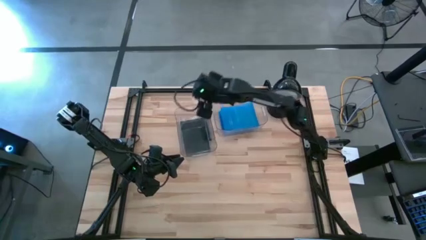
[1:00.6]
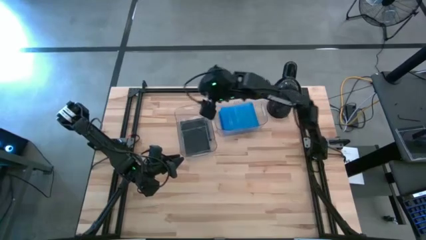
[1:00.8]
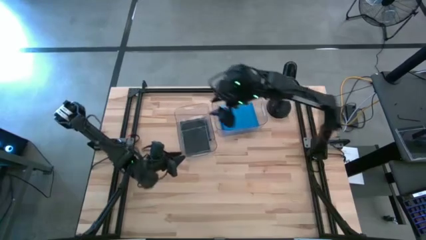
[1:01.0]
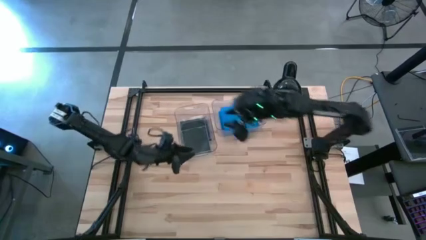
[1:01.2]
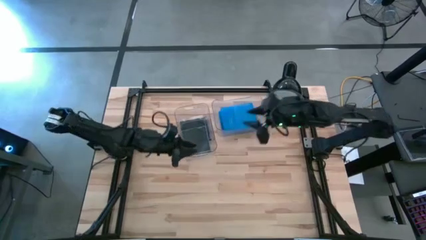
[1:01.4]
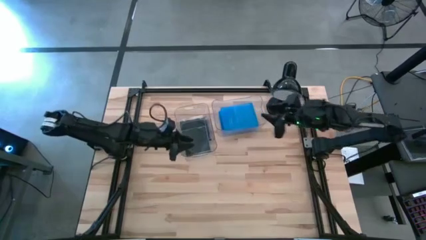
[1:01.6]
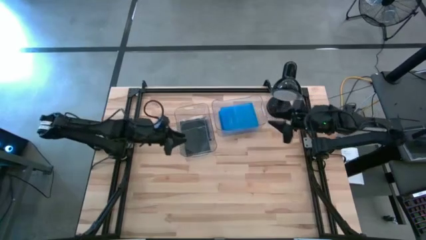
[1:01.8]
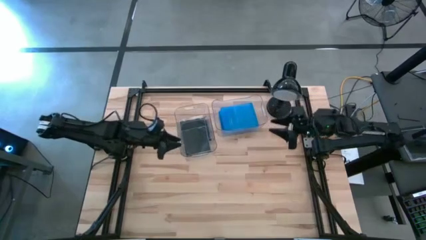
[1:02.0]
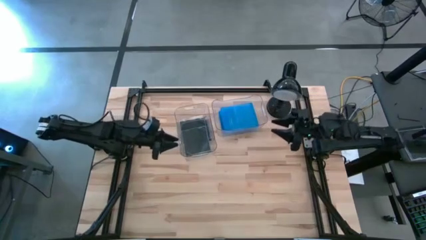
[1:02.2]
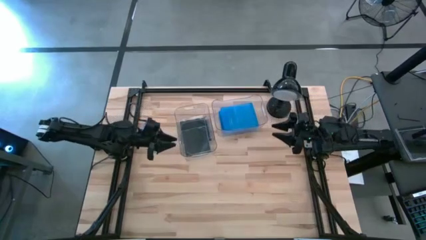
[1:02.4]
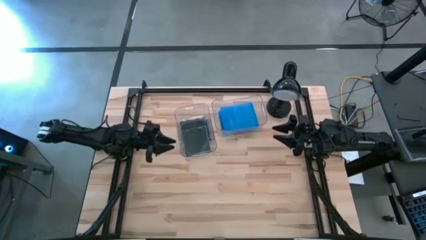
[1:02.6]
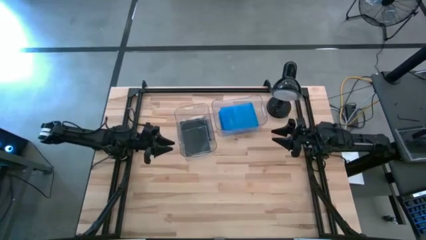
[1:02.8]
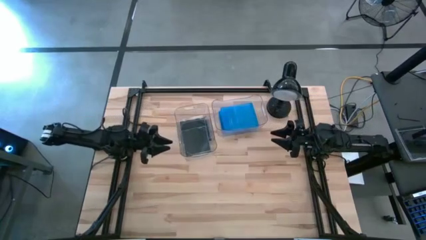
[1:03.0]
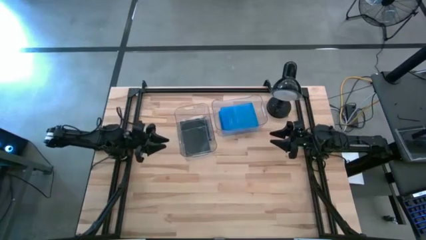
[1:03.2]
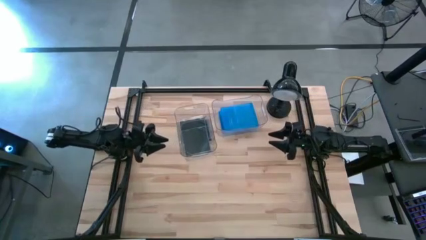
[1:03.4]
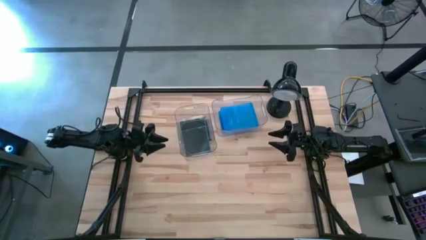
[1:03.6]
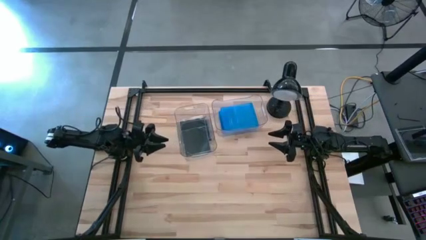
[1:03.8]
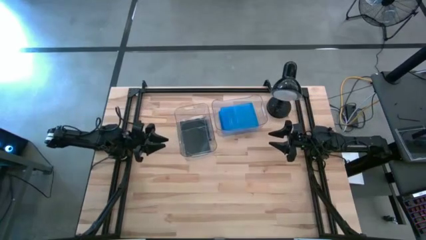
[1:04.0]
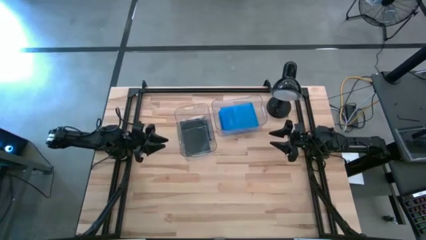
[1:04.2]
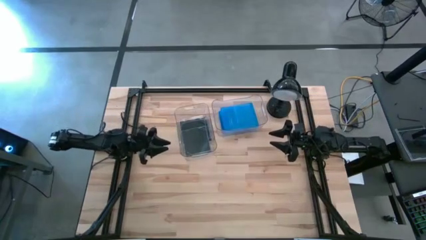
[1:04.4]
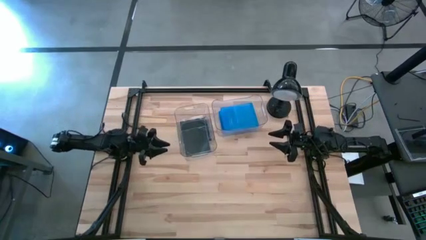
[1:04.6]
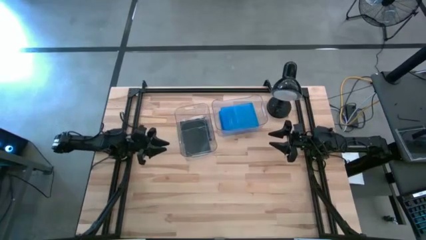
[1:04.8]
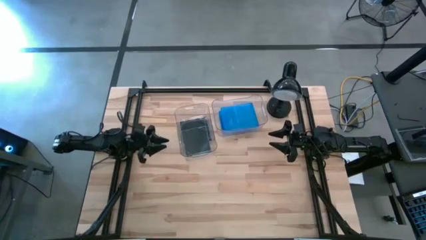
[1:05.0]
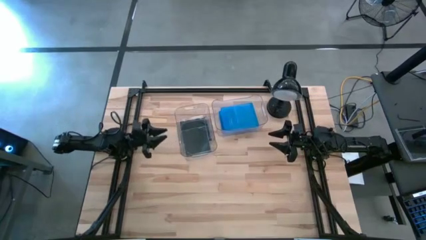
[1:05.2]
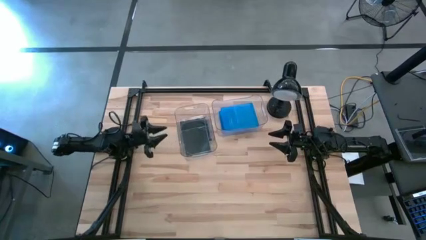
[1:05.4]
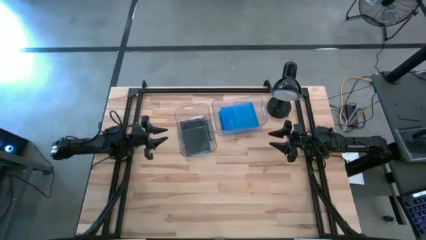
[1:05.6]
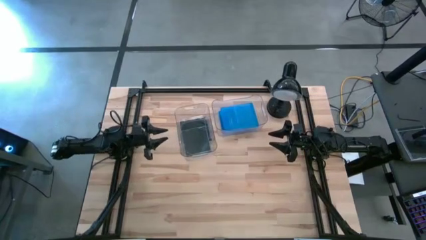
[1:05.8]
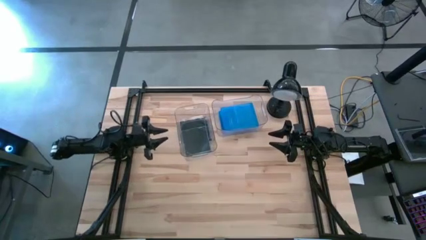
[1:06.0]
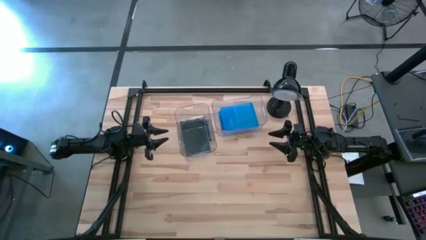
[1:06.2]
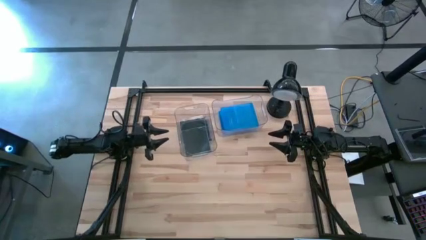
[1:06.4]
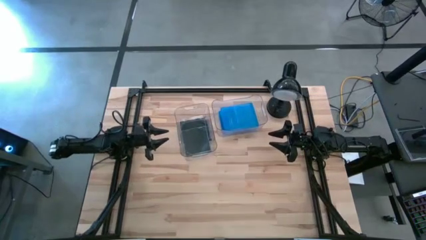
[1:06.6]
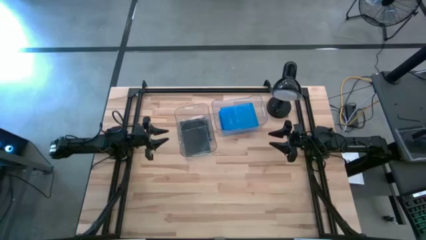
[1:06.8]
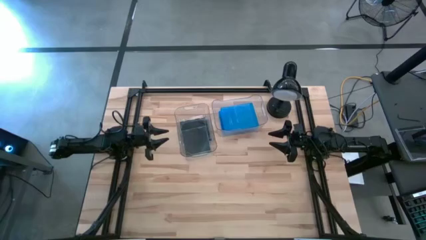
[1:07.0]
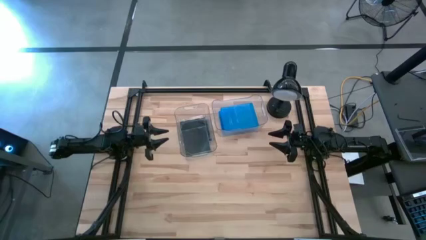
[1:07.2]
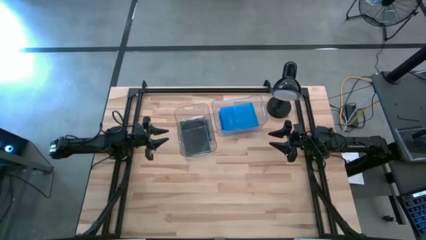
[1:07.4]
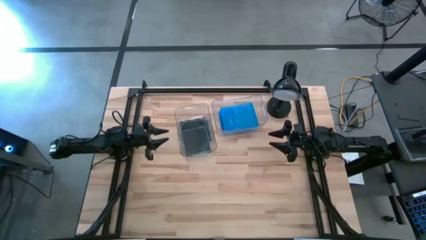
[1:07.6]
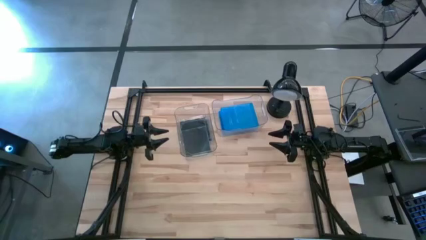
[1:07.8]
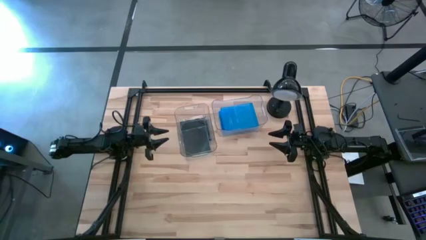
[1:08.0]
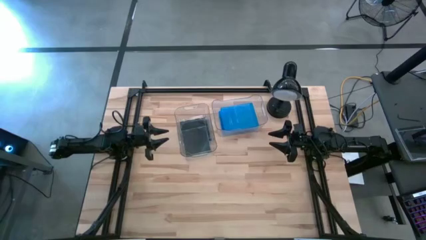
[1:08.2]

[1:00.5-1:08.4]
Task: Pick & place jewel cases by type
Return to Home Position

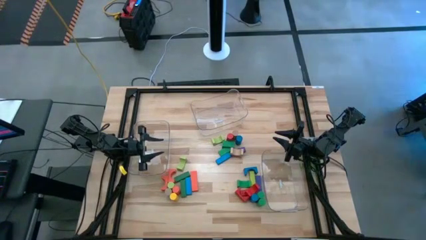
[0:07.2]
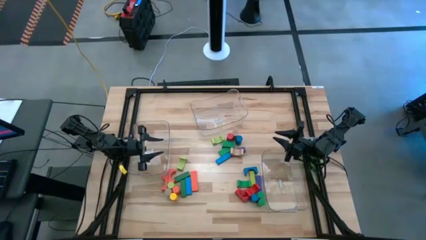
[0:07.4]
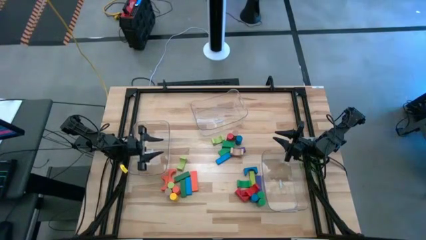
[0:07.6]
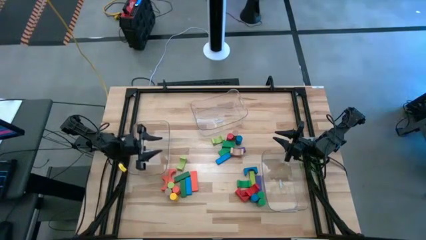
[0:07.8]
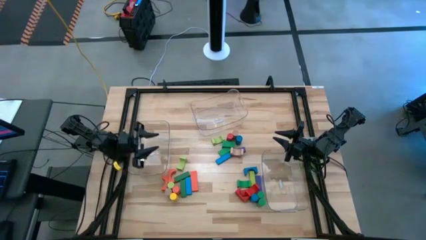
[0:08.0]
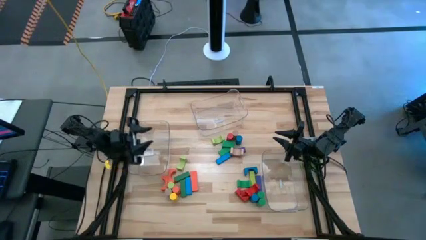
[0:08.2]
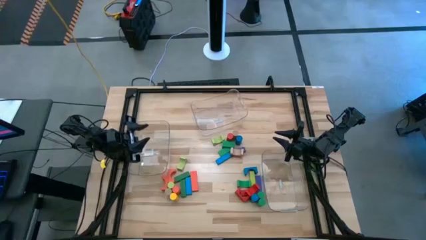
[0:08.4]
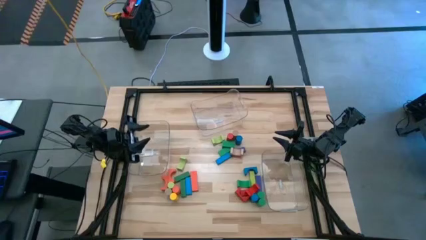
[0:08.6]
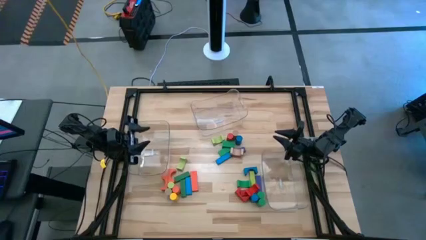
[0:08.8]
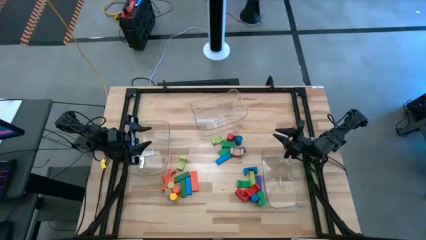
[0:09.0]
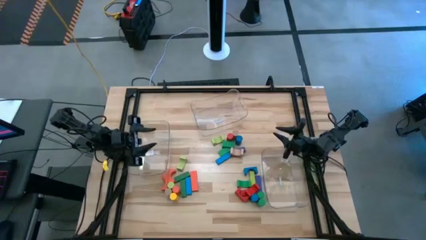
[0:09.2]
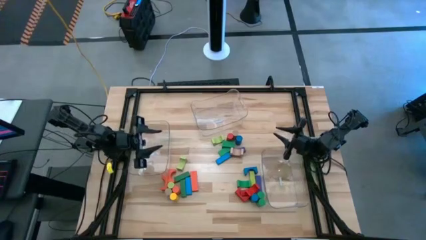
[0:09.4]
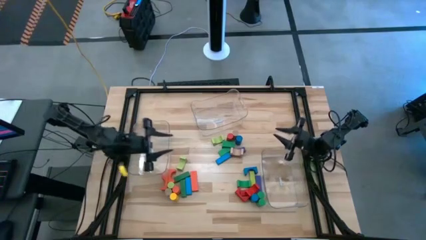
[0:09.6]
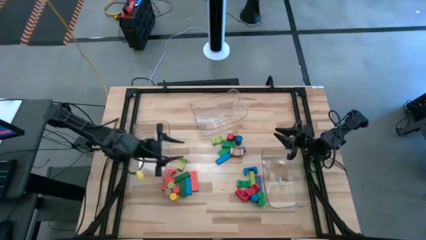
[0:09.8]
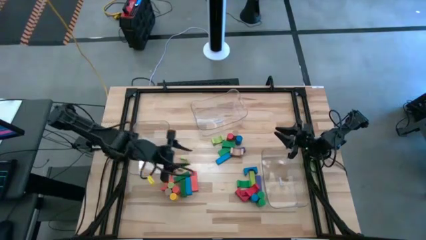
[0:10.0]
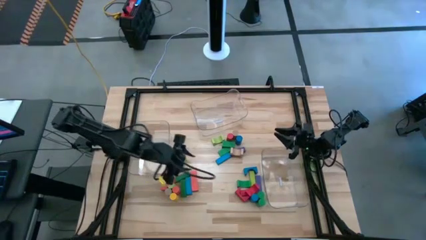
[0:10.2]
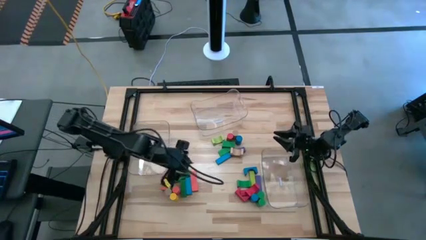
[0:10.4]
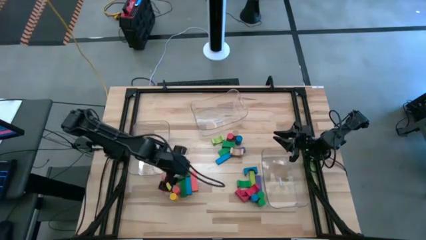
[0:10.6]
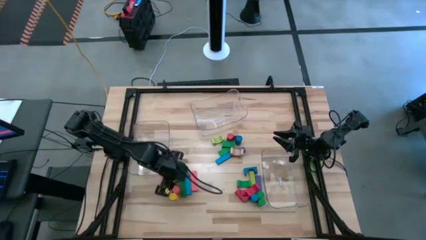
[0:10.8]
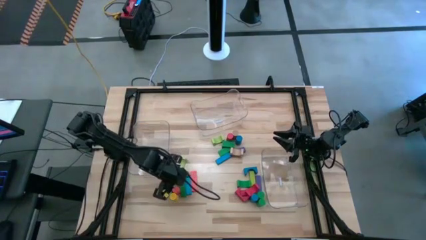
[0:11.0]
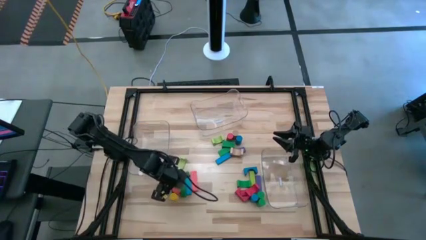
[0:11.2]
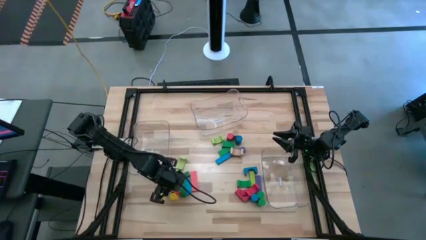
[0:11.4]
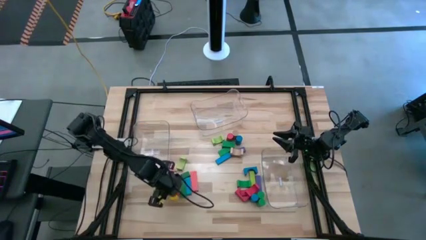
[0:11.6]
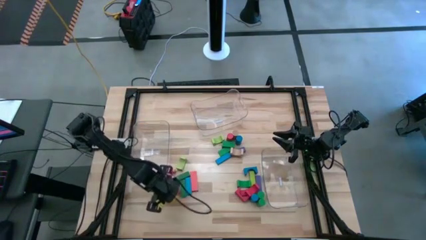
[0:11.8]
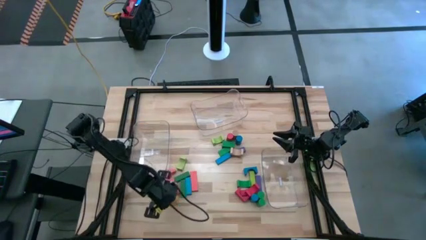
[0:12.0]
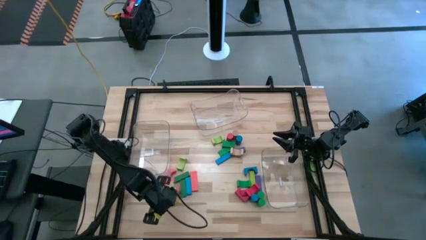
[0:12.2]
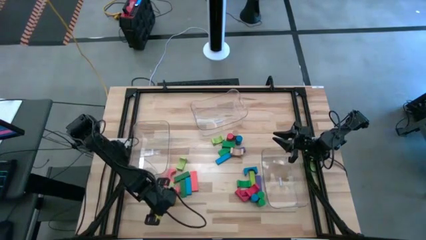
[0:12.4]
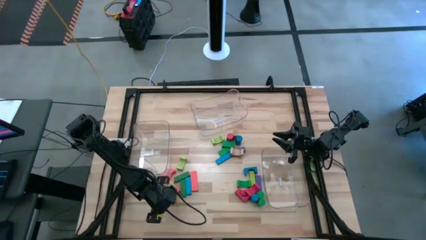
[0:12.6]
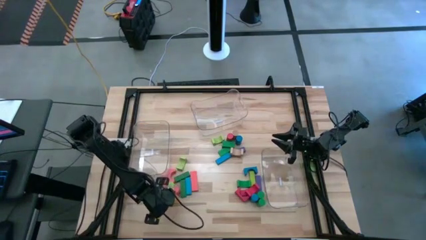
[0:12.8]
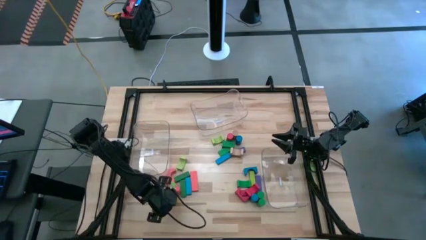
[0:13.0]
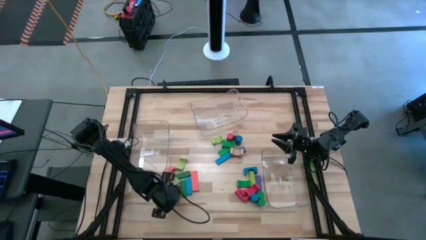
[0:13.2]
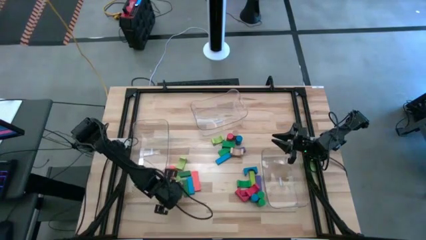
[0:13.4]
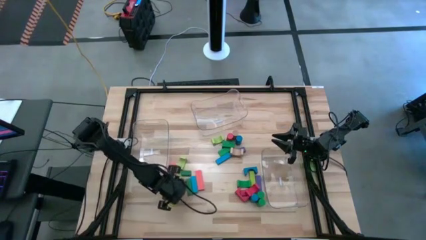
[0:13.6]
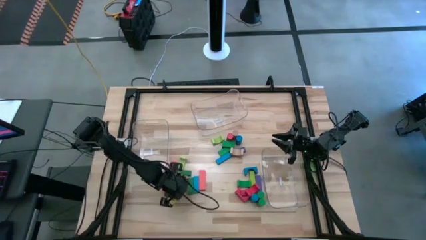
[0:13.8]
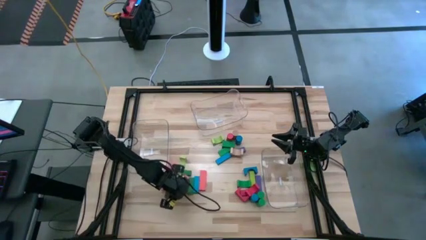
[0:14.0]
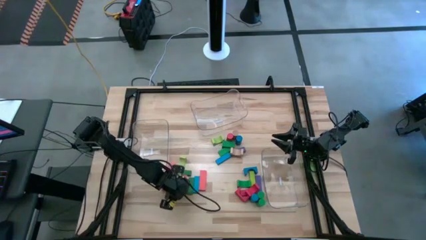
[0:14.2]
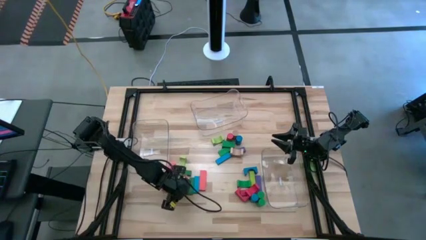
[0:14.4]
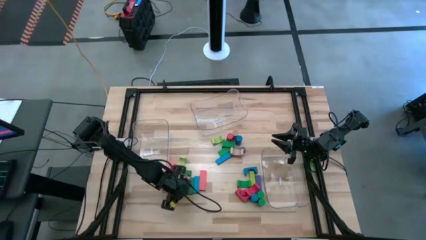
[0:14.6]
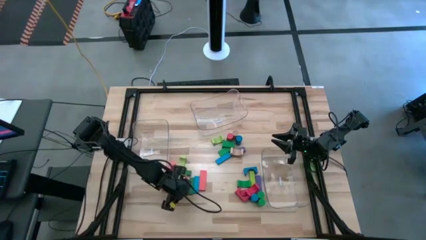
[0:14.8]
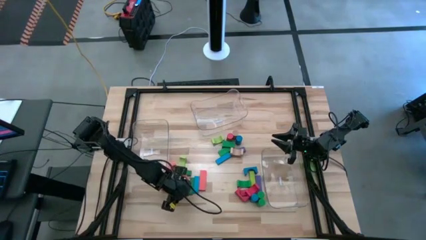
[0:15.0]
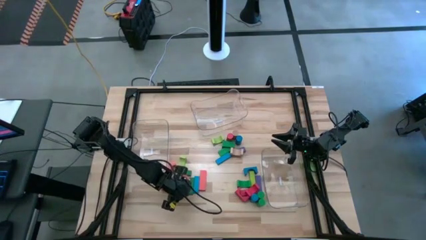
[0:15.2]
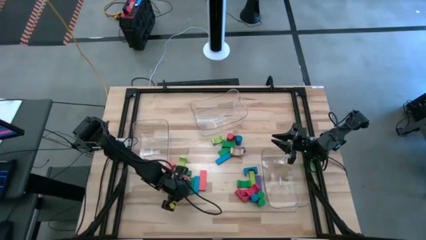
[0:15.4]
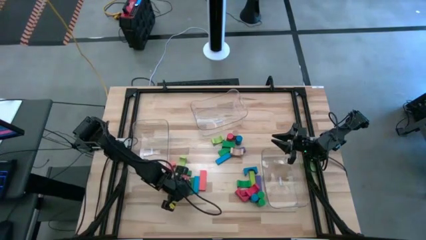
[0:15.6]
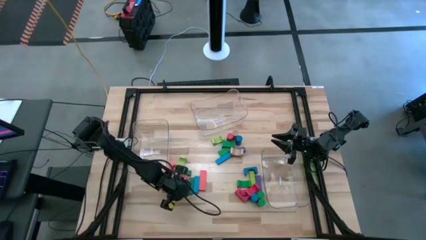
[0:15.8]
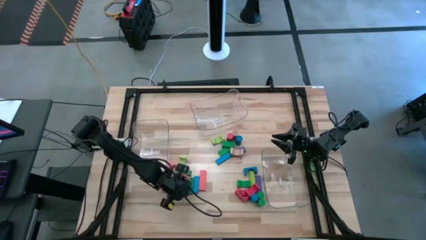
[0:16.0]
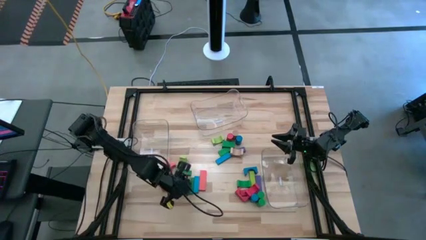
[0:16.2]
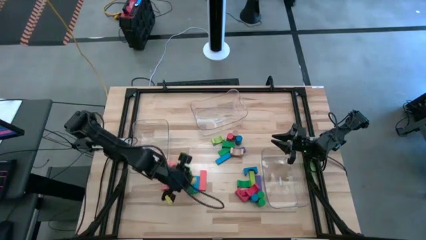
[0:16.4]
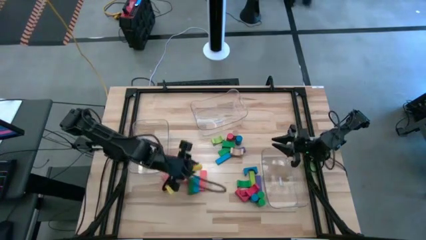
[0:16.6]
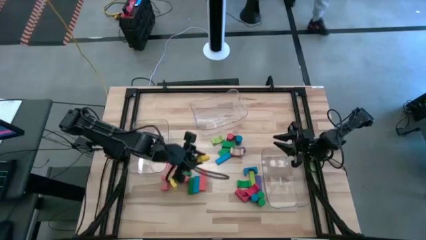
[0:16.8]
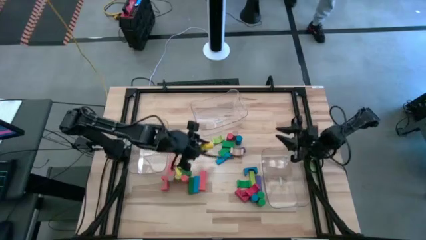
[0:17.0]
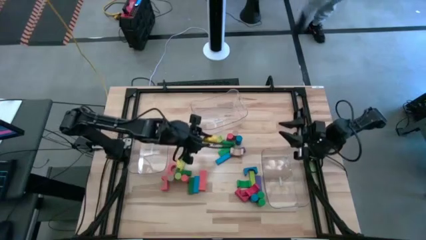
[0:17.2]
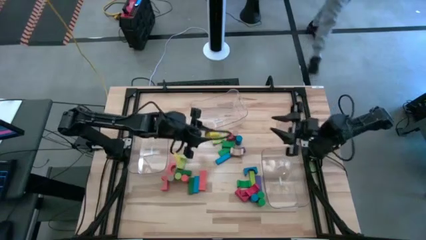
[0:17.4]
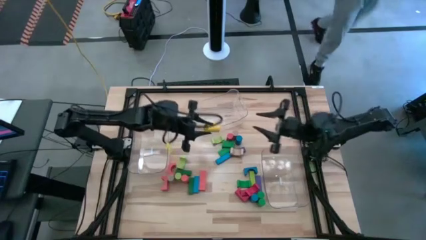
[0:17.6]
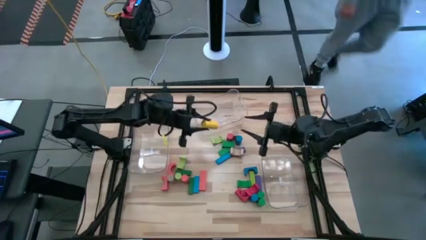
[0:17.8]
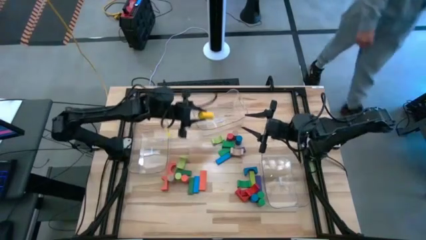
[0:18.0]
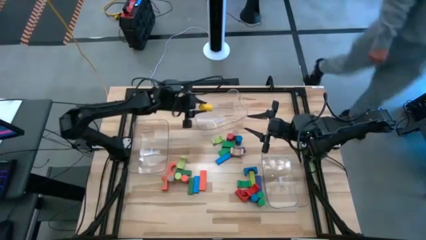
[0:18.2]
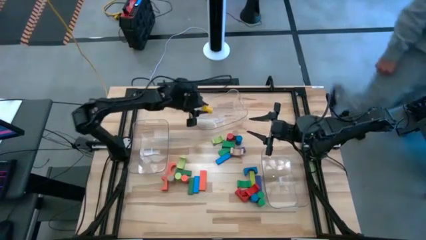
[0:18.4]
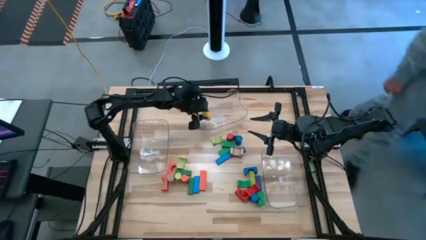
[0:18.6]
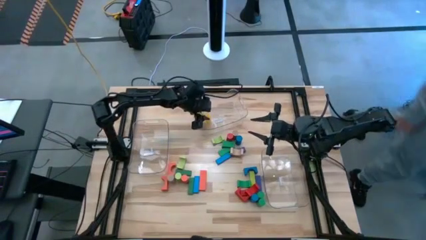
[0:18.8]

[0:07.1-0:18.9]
Task: Sort blocks by size
Put the yellow cylindrical block into the top transparent bin
